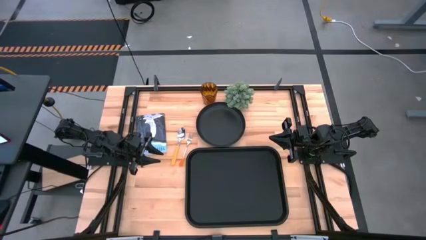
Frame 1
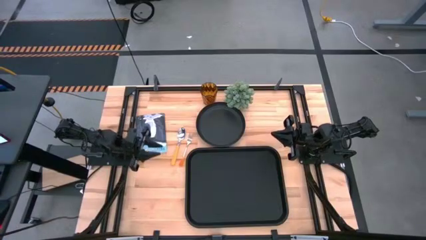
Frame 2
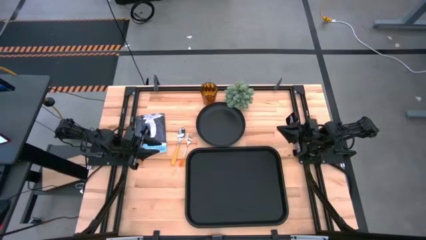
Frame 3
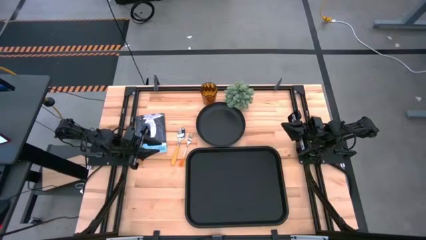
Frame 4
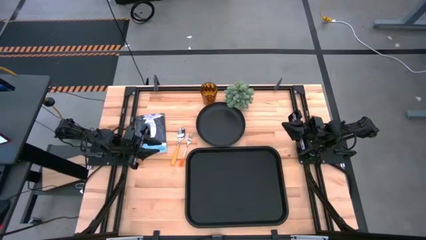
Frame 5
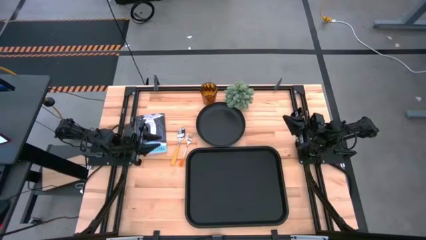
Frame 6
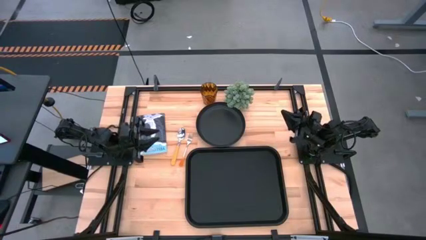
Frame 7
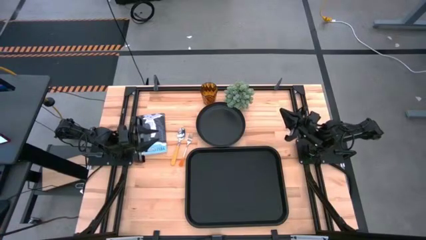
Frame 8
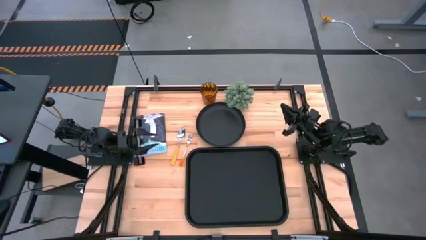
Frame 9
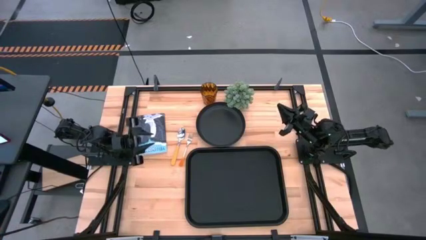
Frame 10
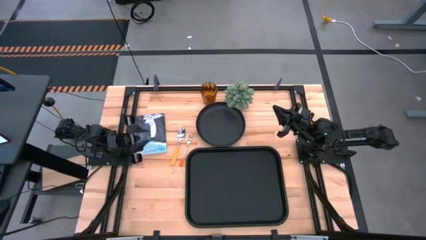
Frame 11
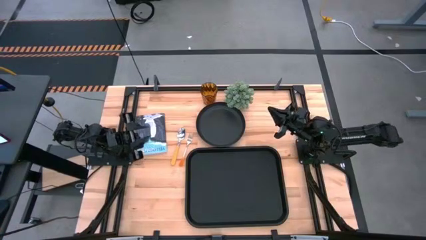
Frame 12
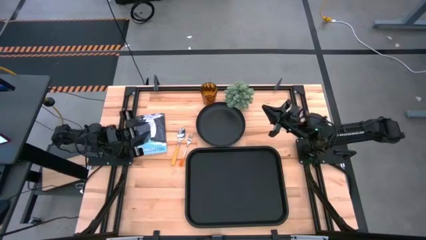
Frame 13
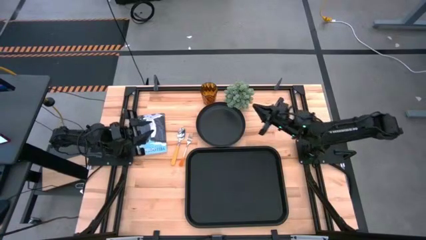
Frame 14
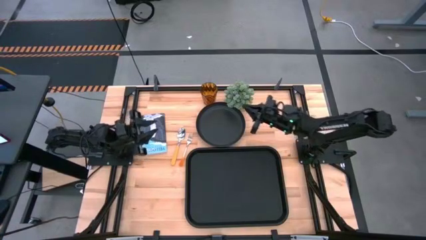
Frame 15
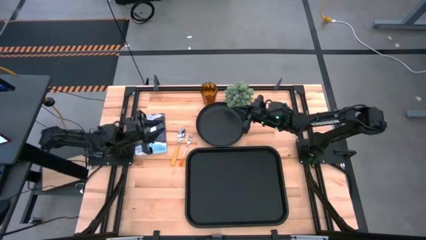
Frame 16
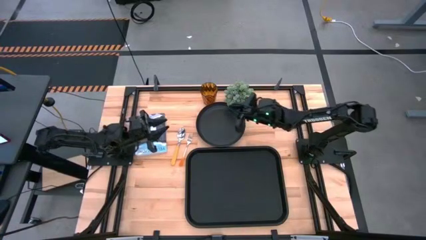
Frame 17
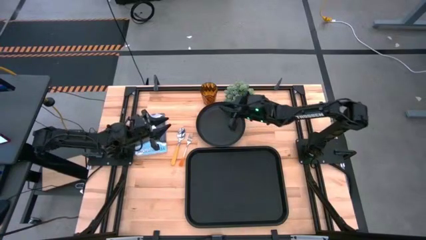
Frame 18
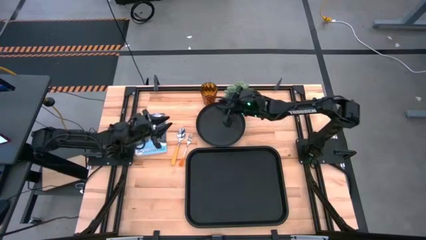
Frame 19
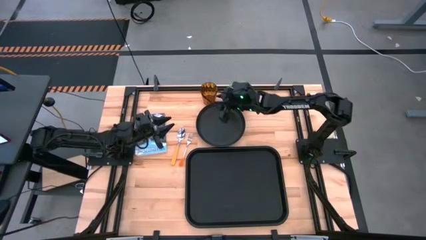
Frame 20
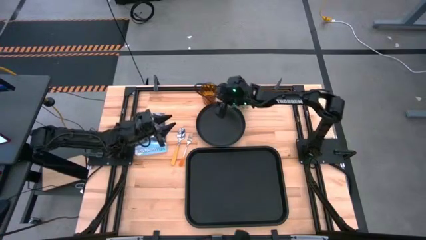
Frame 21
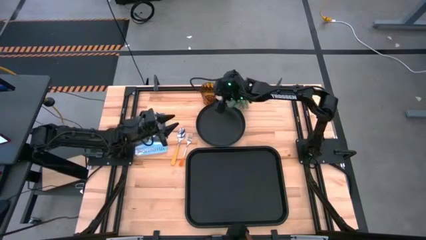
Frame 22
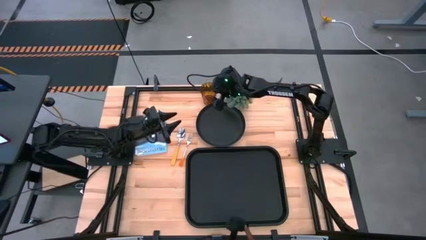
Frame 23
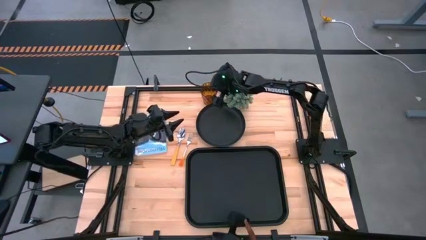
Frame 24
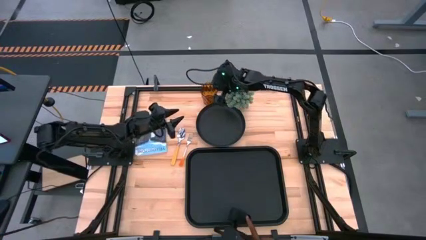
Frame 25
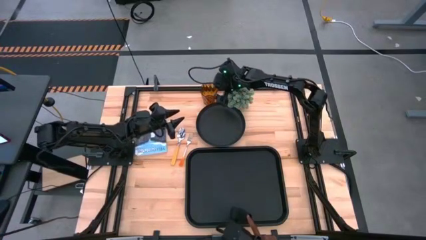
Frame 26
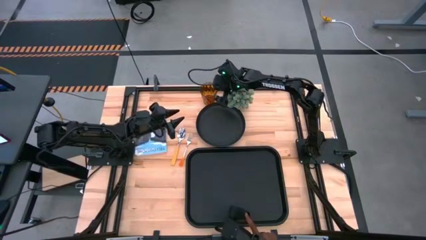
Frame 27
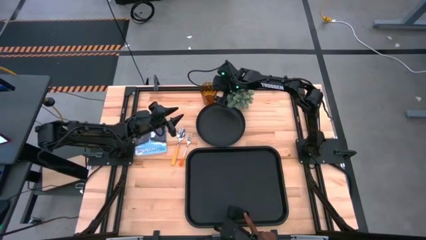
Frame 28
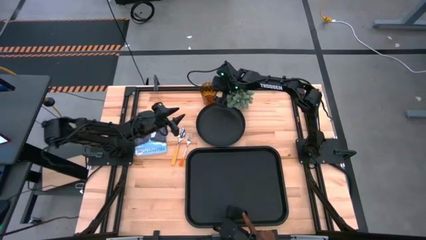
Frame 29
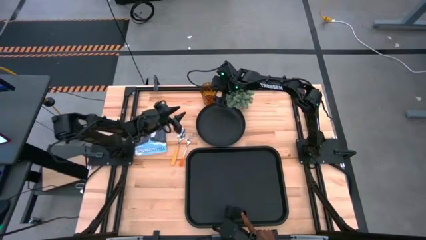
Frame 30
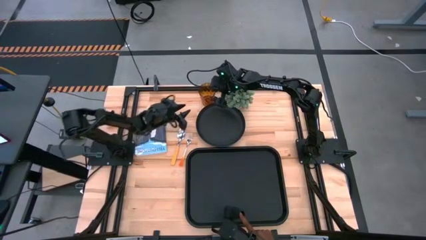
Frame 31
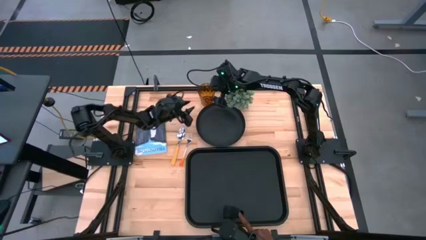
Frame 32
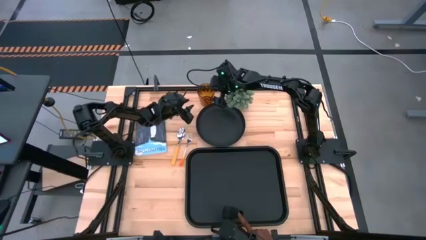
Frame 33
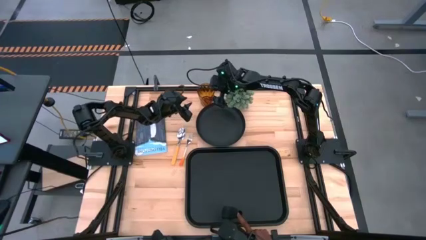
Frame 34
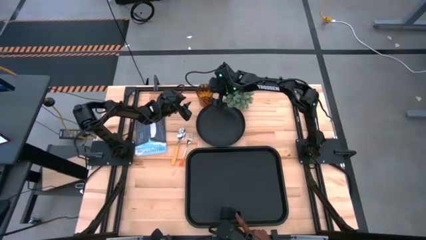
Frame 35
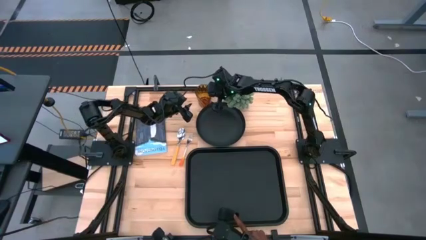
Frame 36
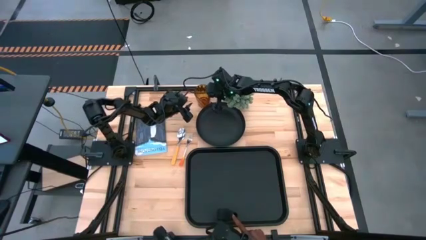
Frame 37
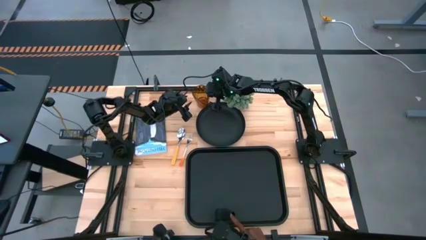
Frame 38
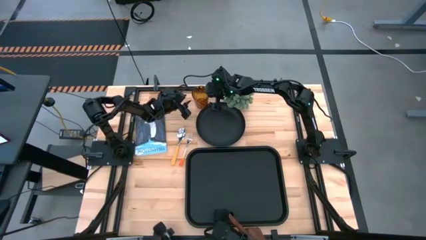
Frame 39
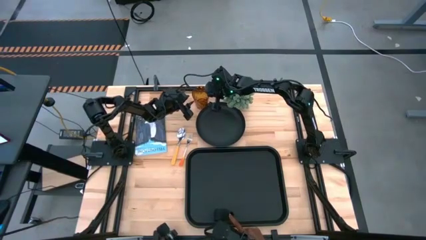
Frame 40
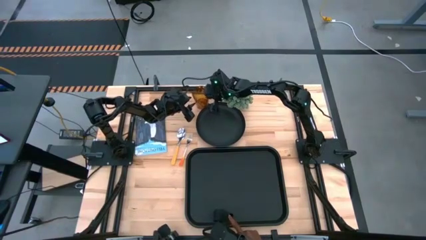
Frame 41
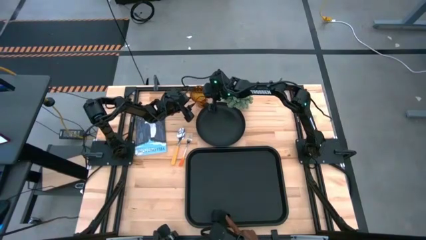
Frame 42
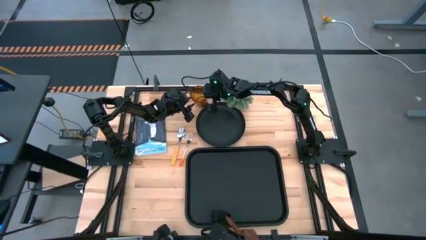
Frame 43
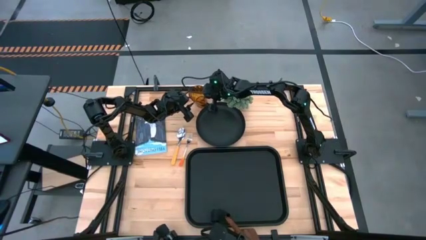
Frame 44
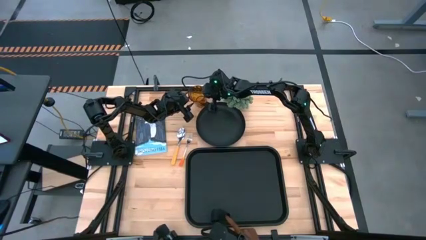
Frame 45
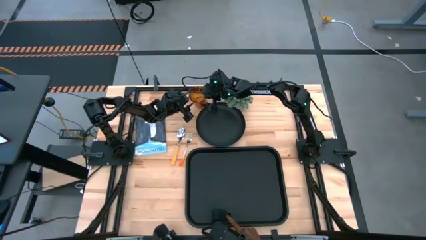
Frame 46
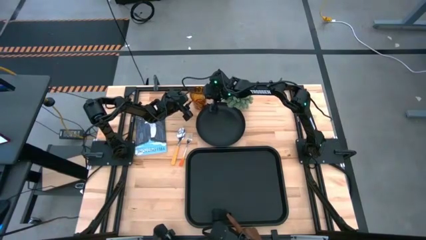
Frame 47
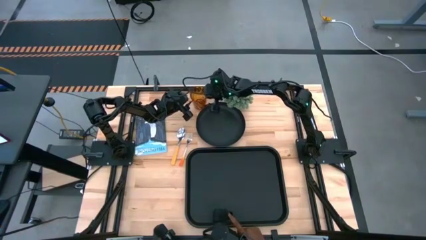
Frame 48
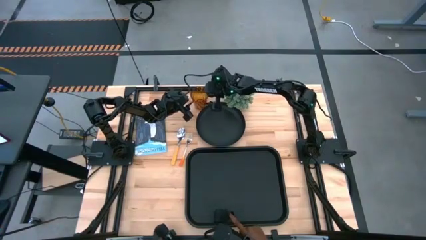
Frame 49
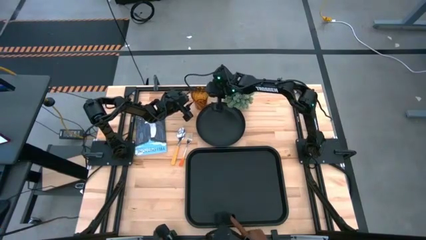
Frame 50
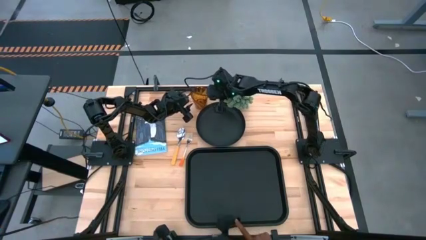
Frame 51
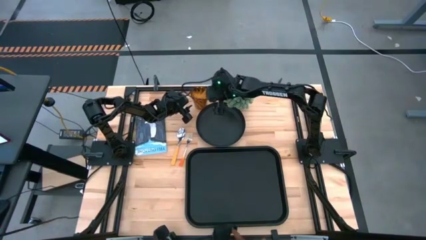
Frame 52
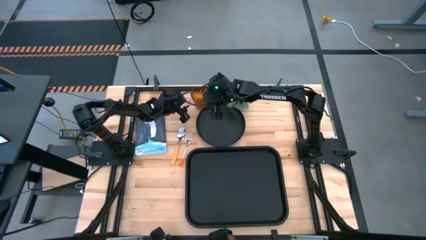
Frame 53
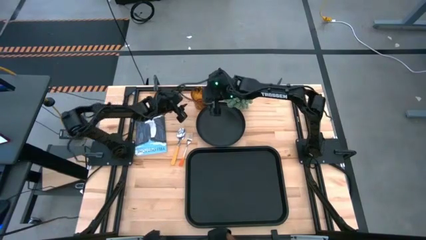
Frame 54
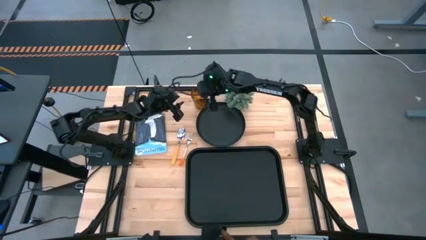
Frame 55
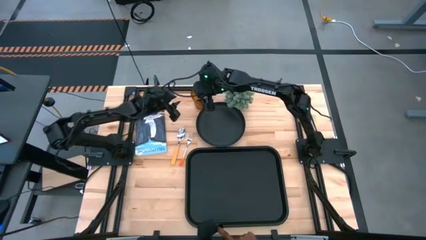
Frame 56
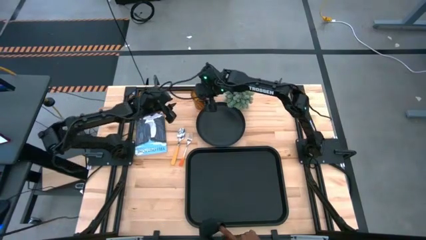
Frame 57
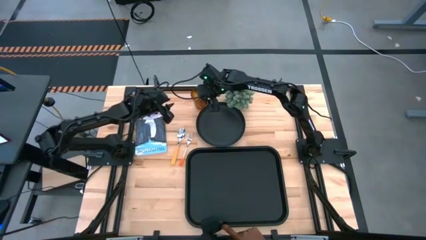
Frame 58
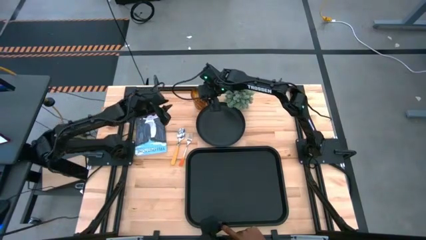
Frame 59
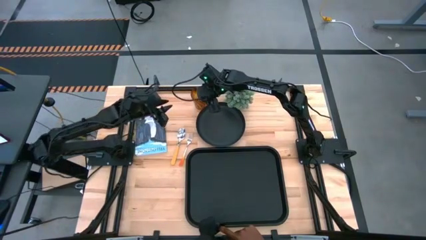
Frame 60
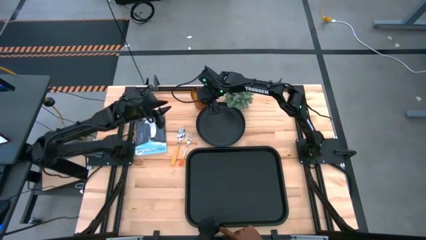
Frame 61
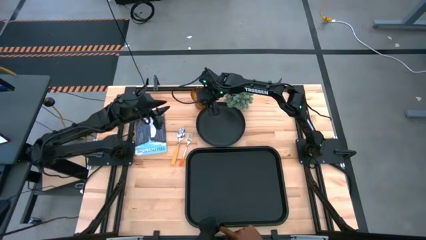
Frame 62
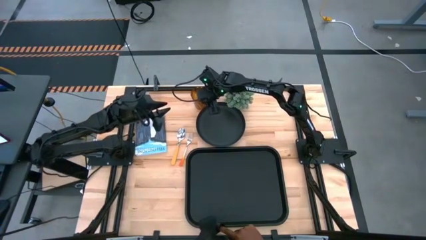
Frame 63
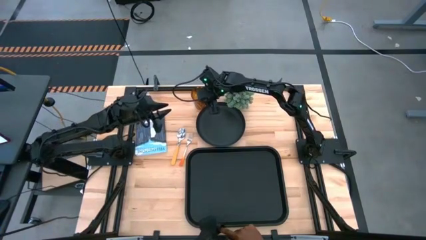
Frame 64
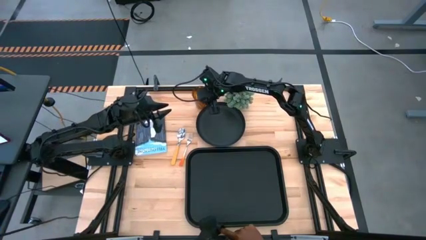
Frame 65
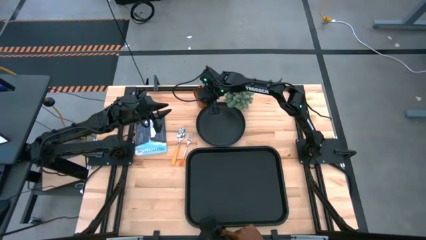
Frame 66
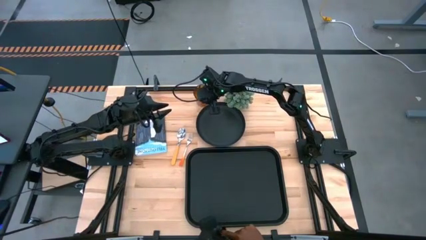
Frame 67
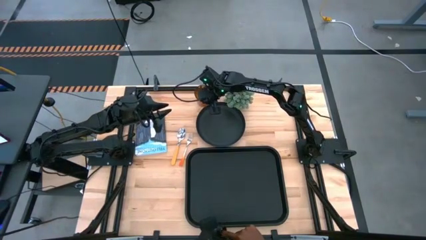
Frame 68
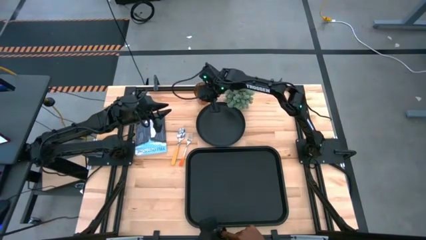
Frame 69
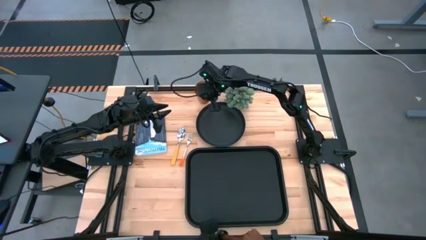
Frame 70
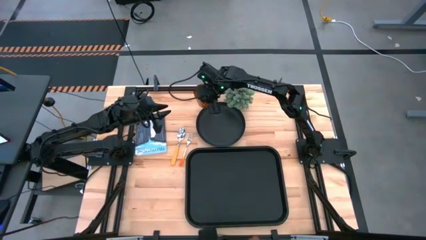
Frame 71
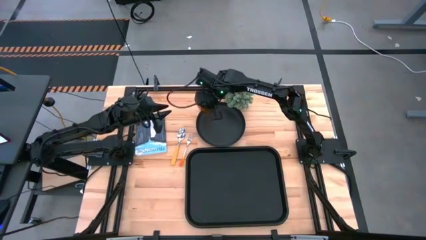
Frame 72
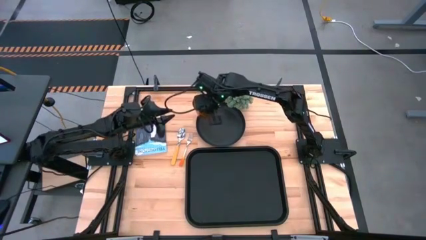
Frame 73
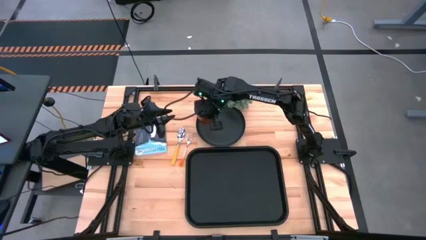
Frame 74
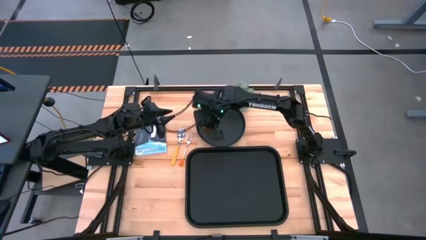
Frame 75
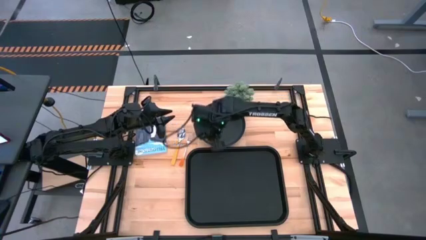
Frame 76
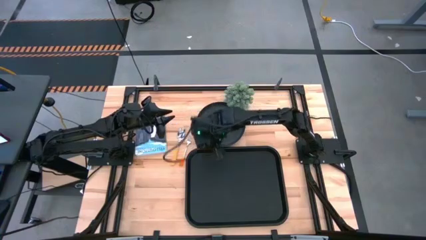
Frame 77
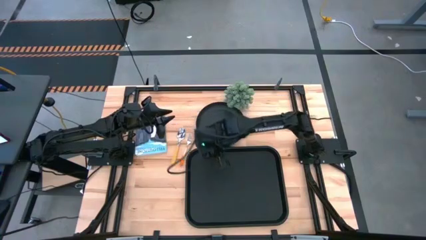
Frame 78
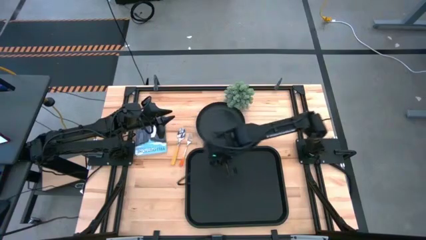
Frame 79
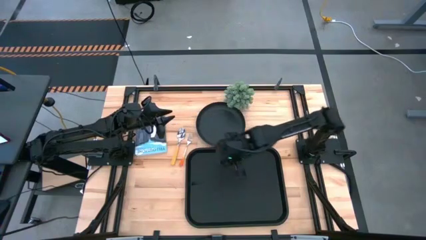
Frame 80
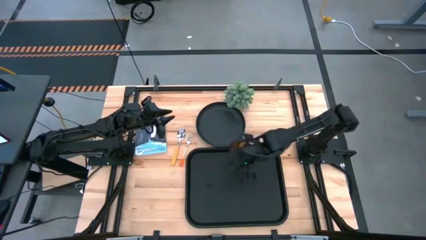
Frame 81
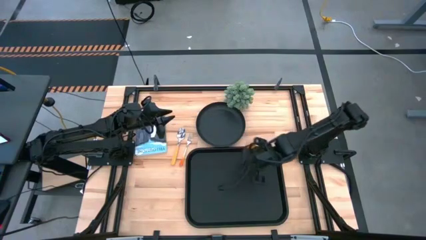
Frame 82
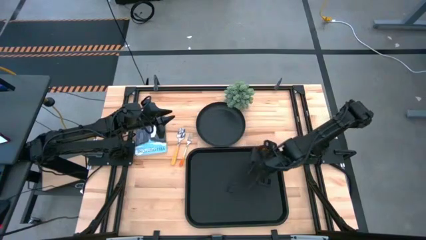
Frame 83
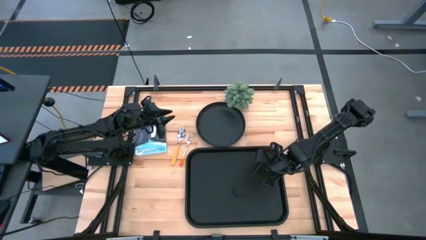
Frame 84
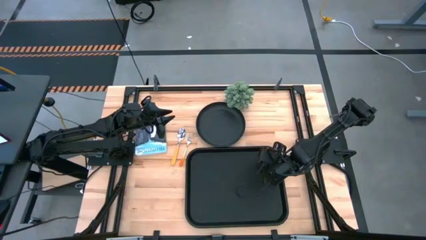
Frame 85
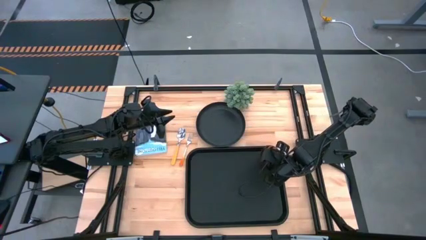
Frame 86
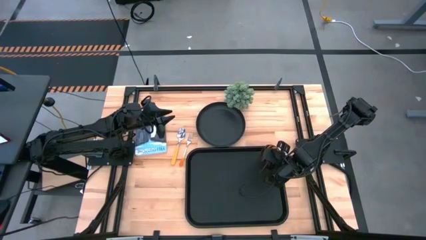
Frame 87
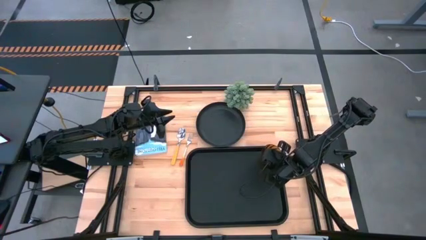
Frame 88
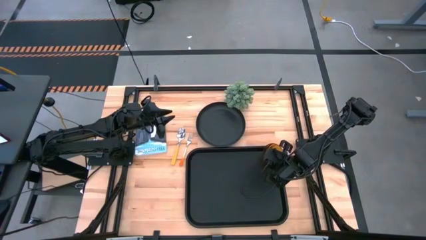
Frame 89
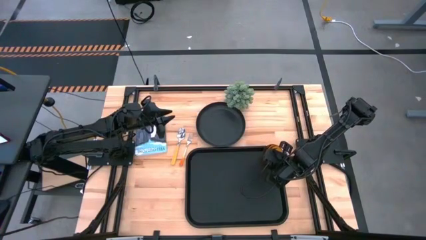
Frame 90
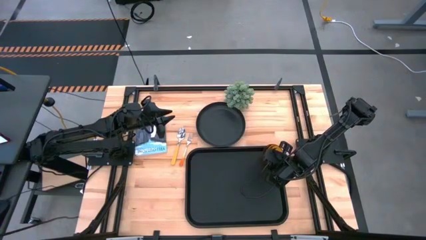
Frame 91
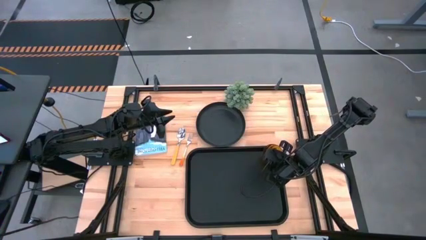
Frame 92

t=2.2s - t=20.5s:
Task: Pick and place plate/cup/fork/spoon on tray
Put the orange cup in the top right corner of the black tray
